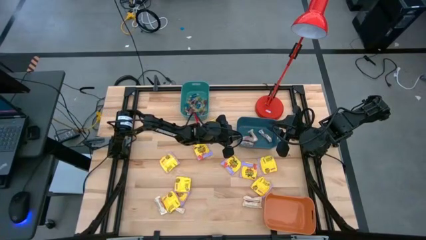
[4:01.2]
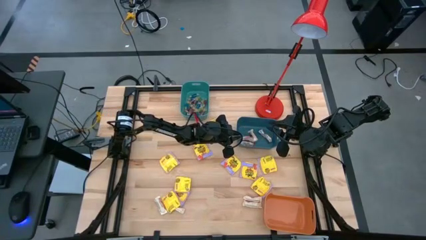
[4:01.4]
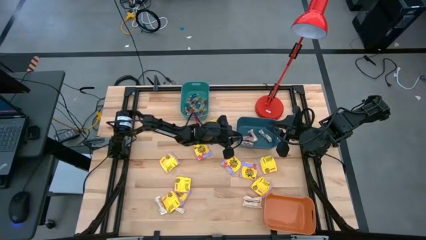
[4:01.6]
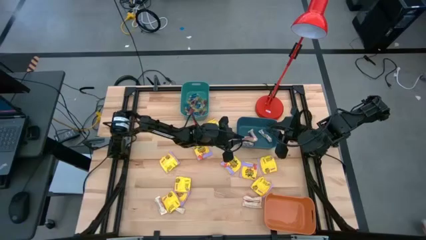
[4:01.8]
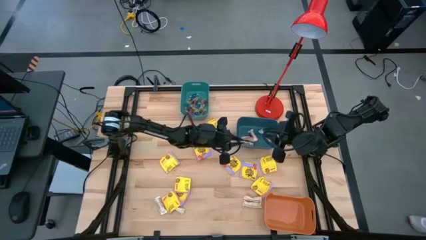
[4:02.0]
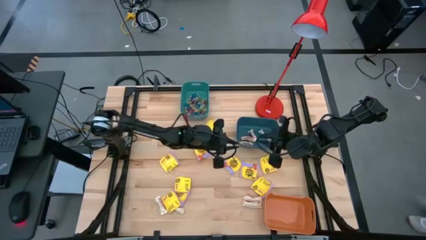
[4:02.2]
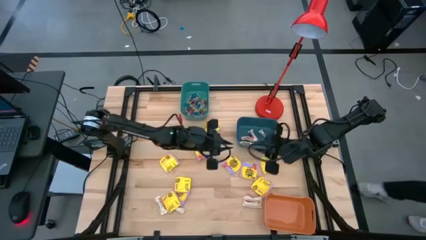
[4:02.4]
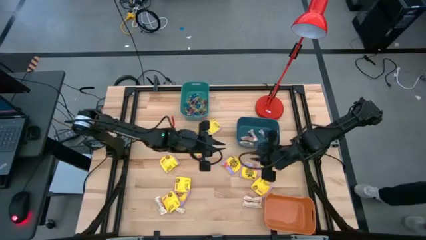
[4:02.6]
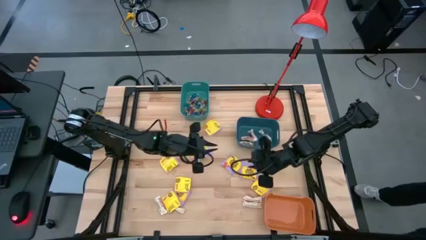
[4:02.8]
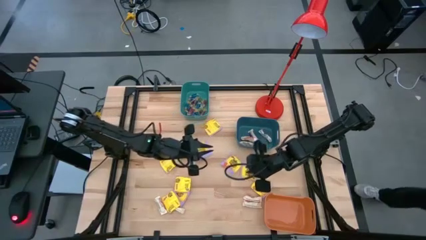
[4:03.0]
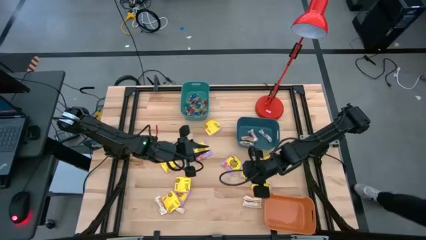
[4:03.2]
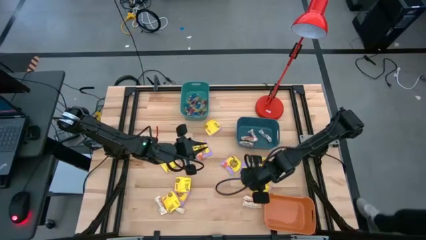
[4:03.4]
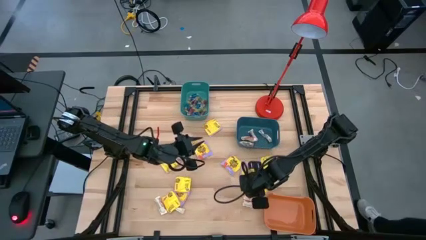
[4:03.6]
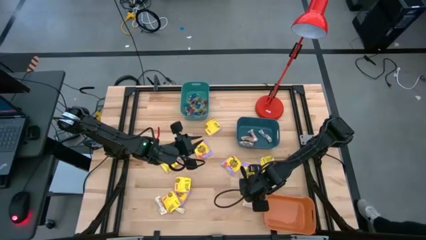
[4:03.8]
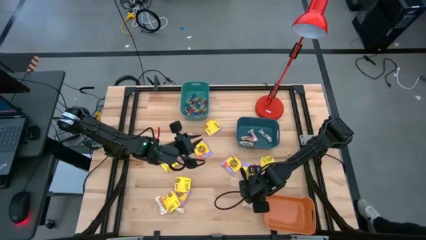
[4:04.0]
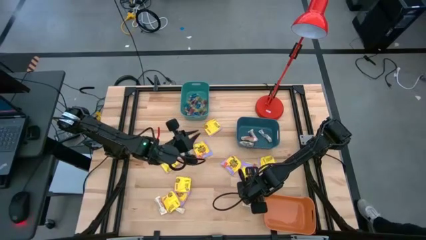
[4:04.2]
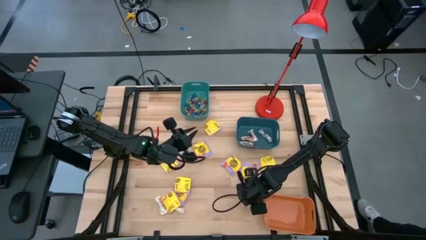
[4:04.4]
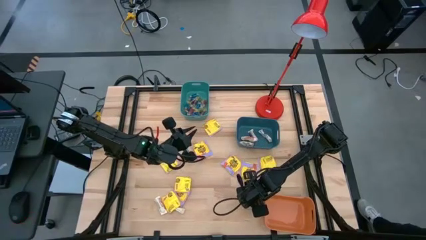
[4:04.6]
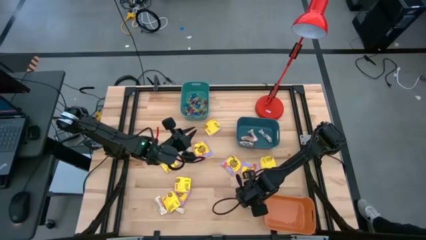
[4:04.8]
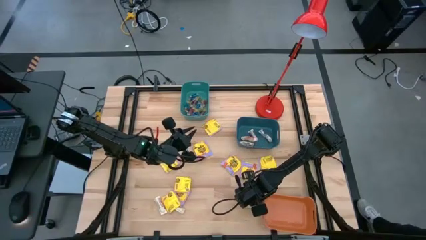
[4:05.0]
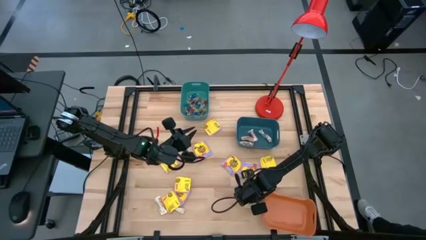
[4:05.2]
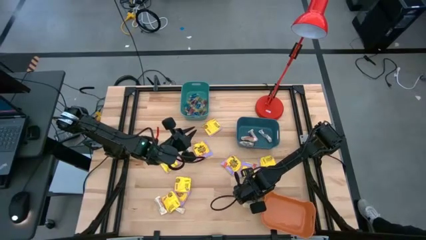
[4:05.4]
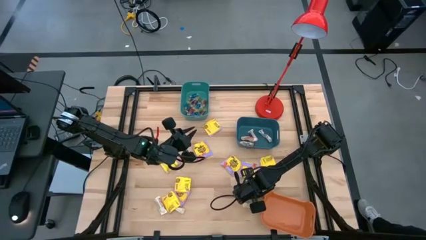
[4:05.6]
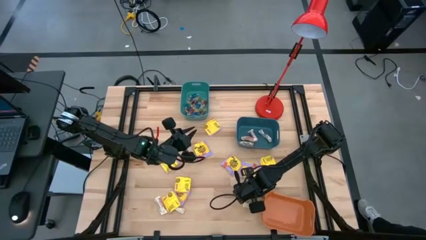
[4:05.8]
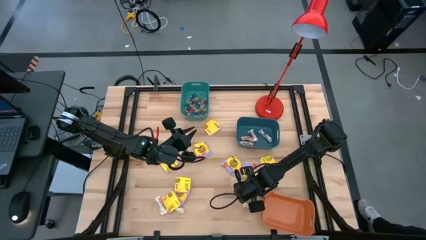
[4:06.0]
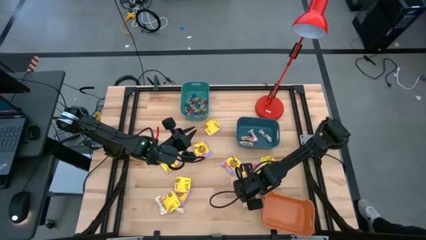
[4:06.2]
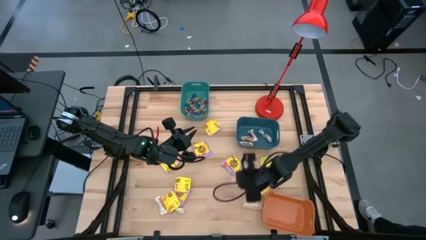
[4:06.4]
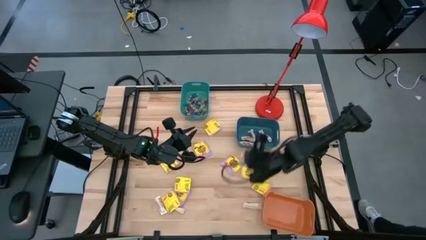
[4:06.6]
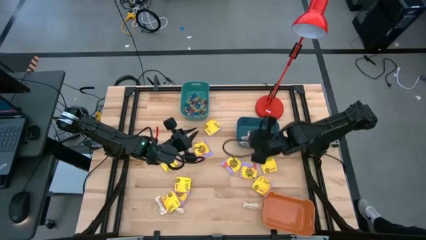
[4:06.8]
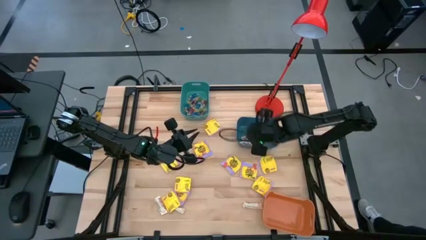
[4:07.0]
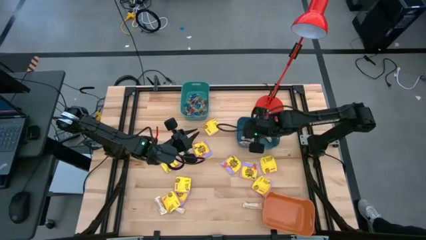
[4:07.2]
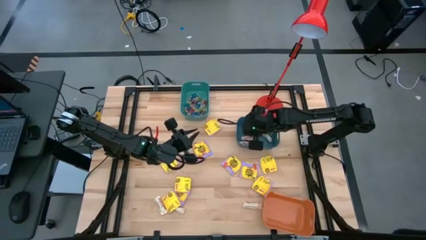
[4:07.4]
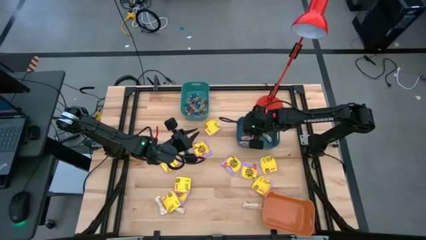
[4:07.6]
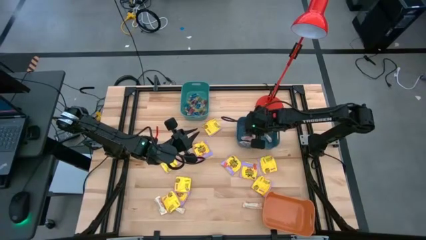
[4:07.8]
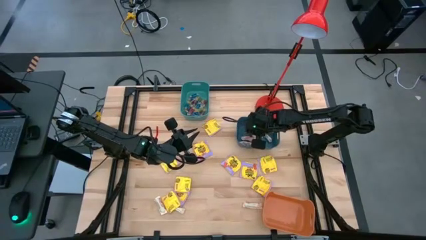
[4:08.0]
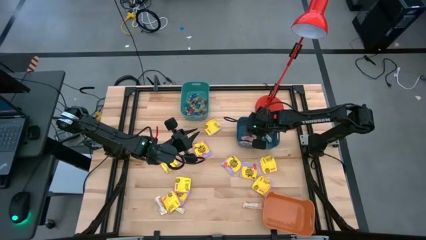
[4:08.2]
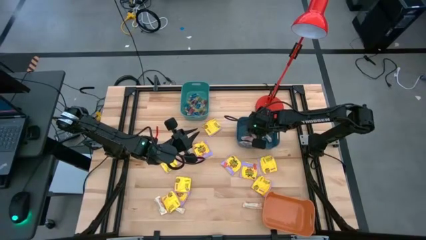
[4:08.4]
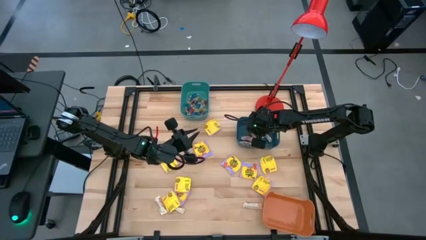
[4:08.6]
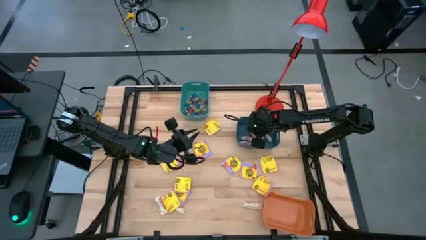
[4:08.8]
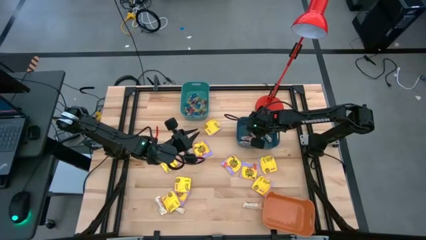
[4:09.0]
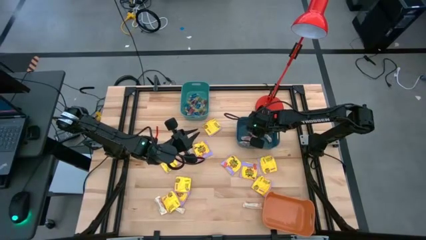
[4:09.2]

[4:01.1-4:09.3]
Task: Sort candy
Put the white chocolate bar into the blue bin

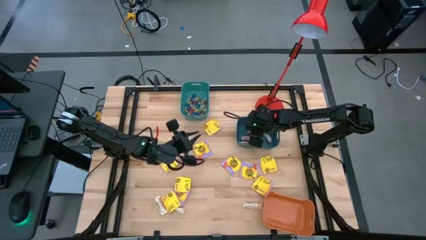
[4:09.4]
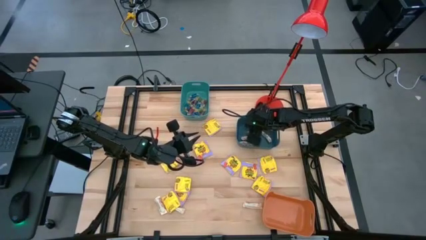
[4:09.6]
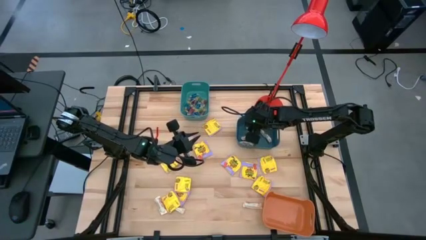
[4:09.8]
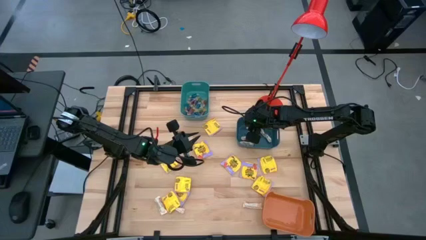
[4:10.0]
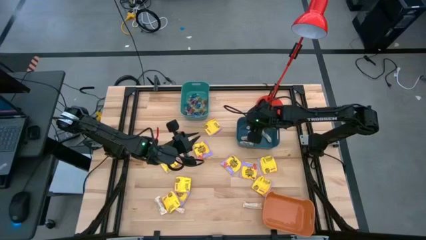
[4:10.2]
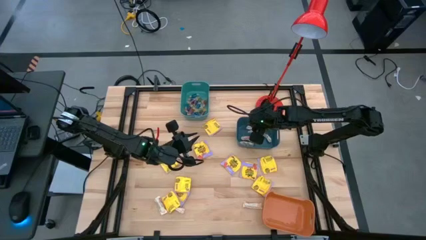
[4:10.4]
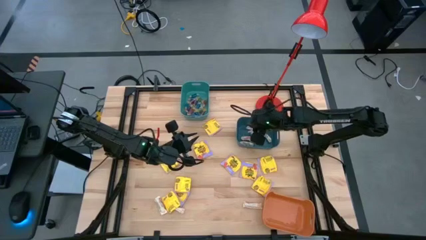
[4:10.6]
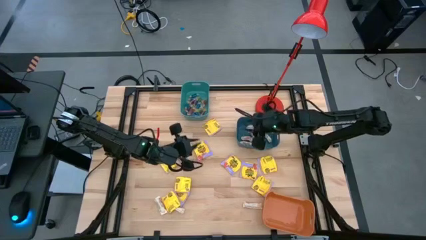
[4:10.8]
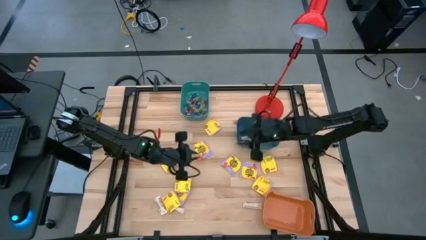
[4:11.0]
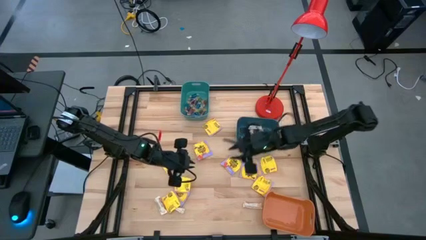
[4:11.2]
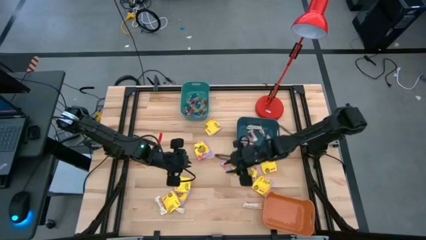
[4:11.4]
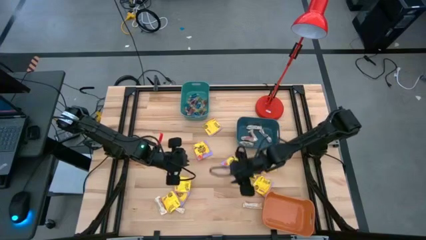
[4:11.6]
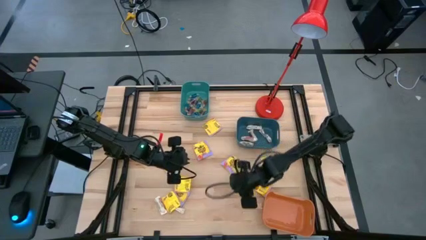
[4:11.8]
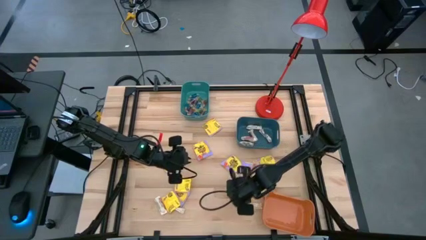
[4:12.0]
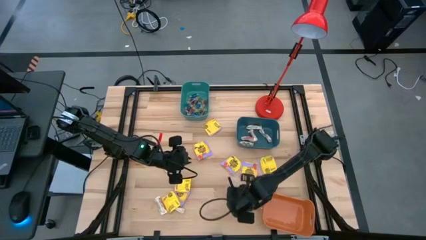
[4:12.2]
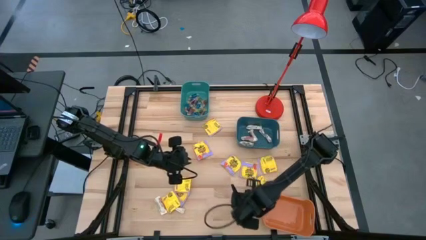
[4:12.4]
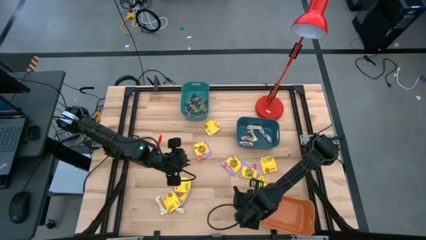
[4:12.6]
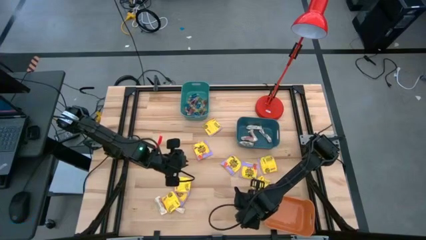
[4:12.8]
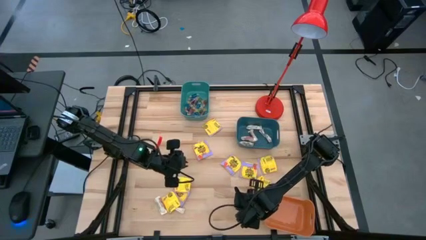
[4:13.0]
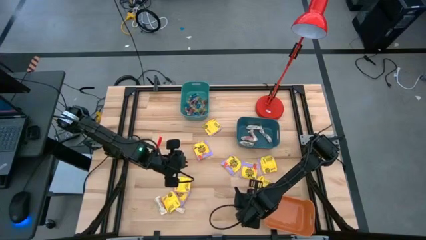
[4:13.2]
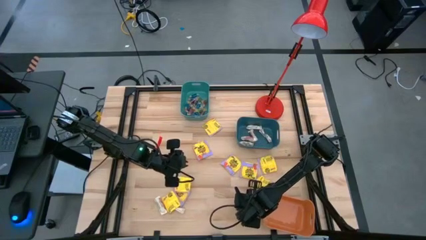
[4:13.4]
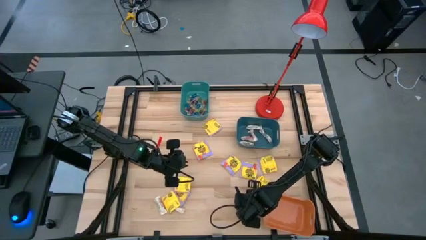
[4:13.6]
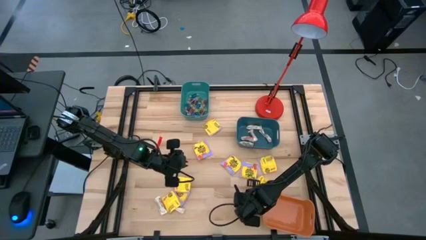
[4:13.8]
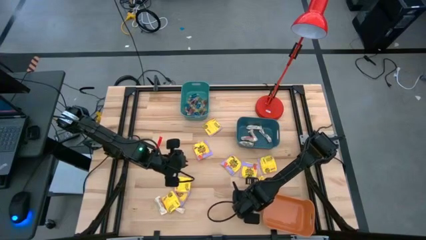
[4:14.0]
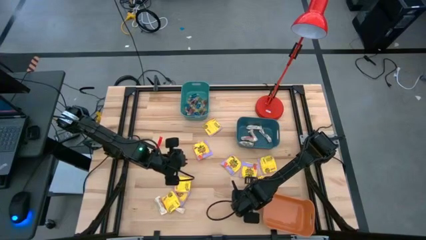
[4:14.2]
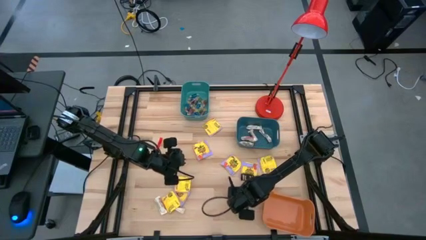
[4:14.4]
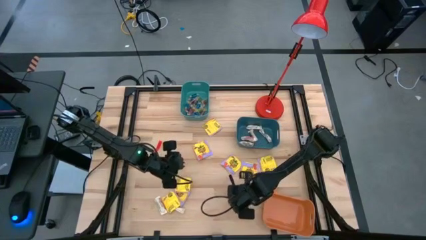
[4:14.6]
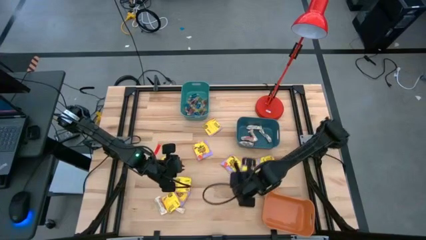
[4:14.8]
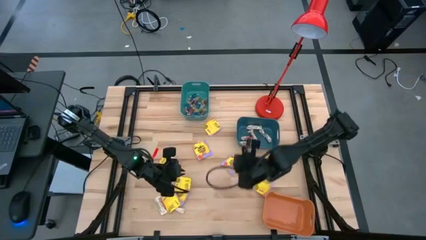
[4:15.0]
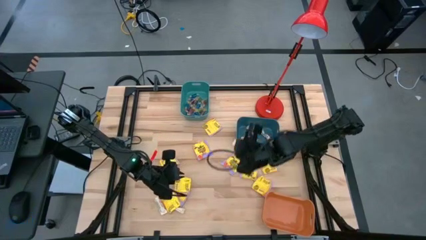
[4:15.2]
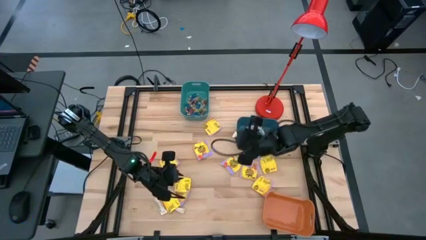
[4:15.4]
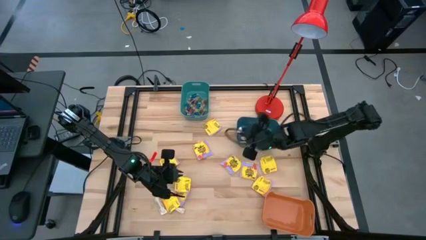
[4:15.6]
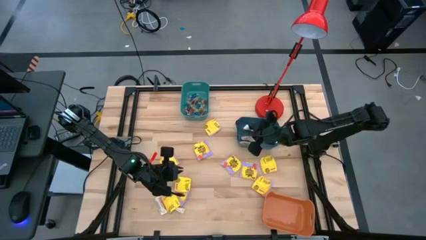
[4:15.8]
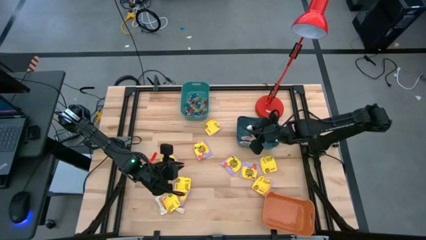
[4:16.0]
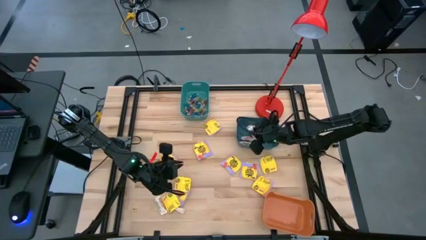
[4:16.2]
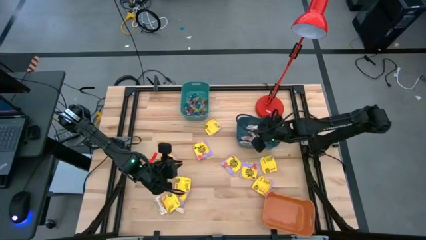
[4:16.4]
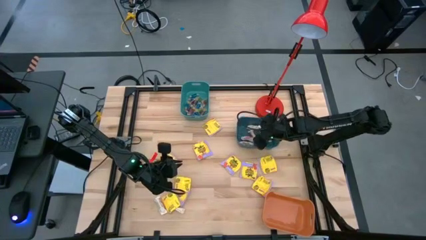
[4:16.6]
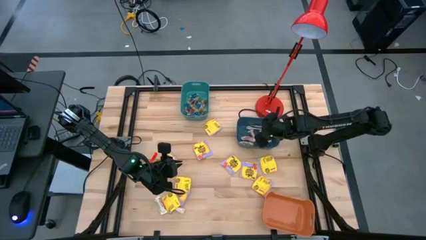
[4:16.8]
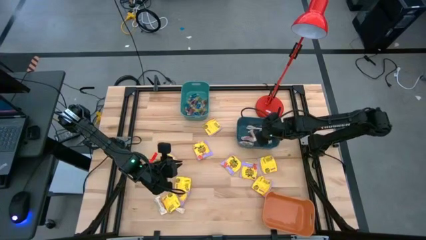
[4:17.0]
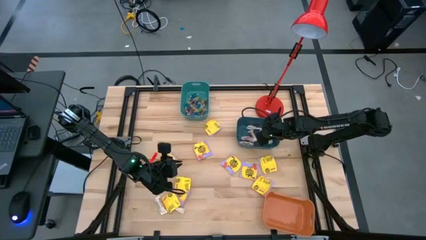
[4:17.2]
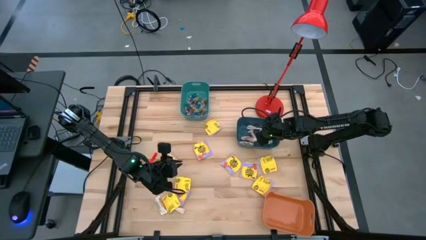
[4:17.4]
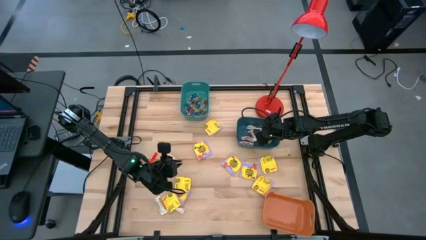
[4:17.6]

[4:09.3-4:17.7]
Put the white chocolate bar into the blue bin
